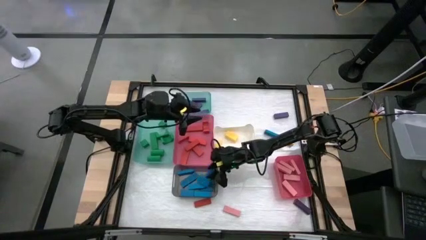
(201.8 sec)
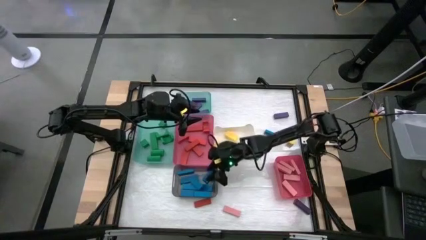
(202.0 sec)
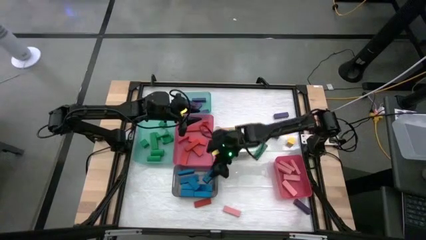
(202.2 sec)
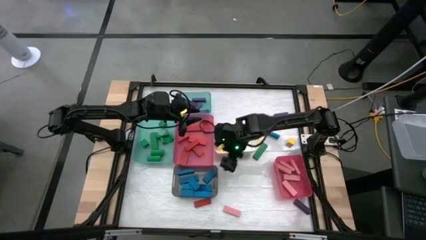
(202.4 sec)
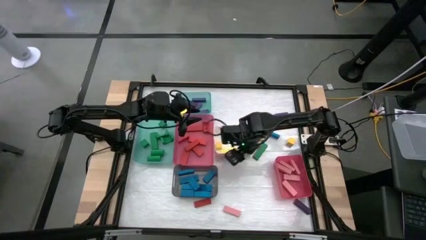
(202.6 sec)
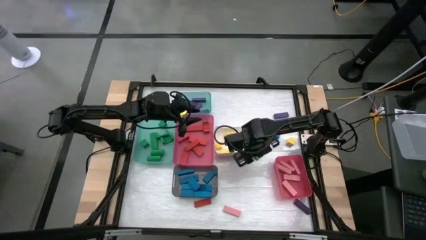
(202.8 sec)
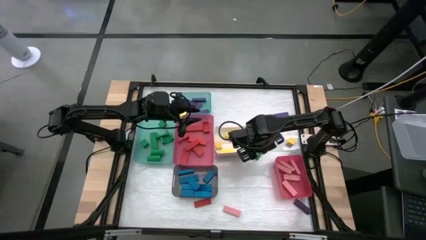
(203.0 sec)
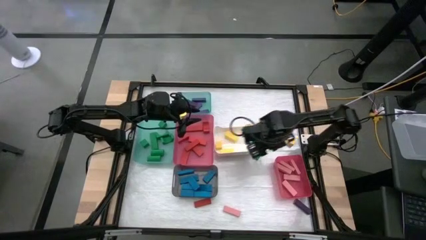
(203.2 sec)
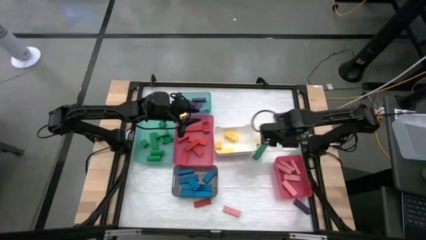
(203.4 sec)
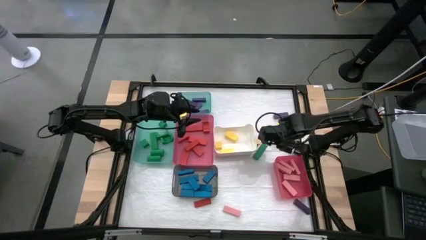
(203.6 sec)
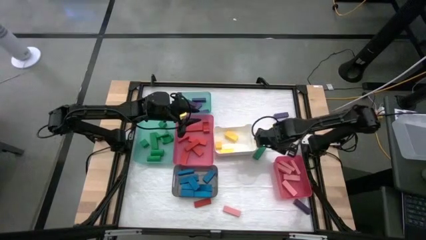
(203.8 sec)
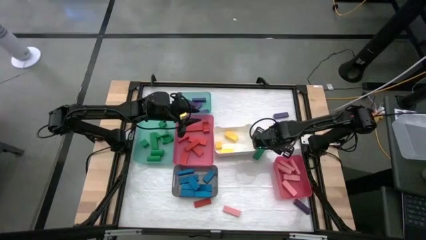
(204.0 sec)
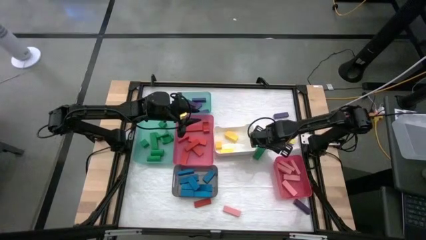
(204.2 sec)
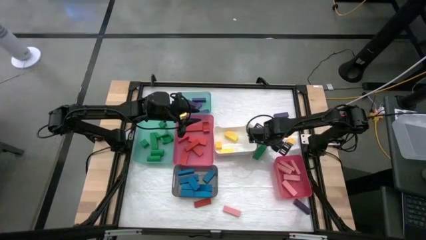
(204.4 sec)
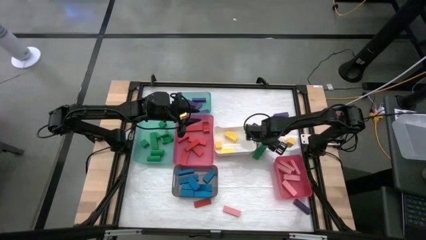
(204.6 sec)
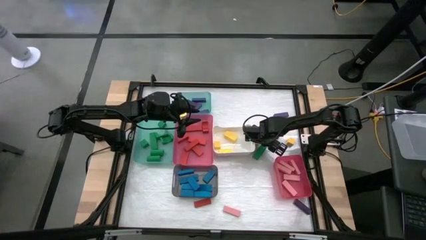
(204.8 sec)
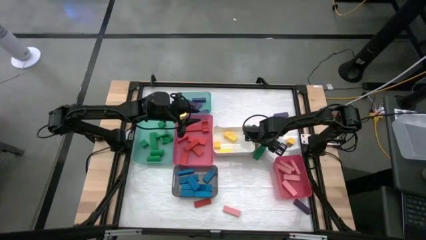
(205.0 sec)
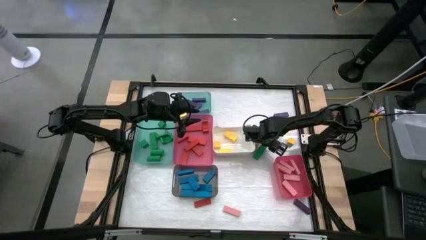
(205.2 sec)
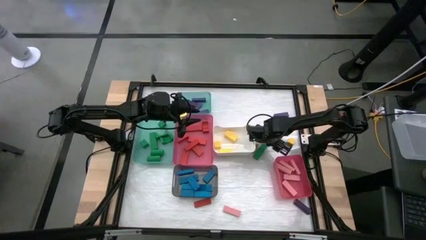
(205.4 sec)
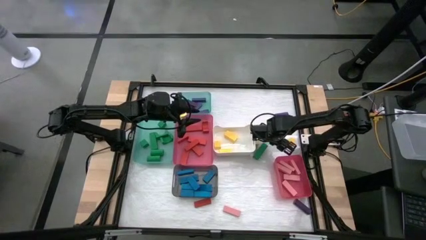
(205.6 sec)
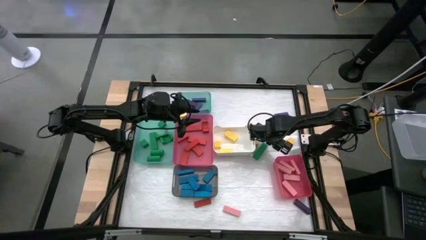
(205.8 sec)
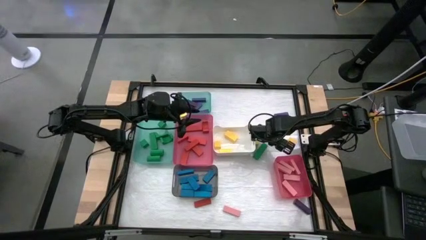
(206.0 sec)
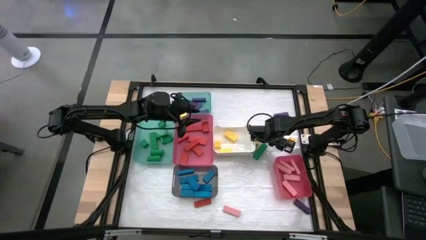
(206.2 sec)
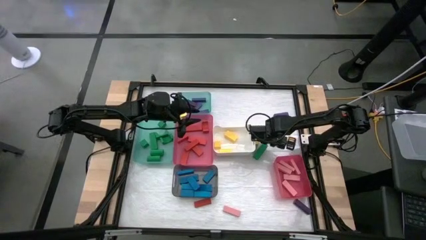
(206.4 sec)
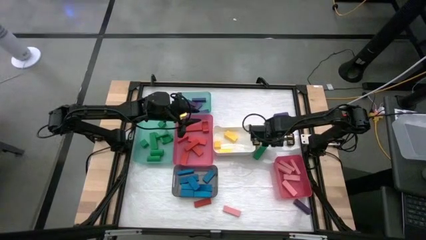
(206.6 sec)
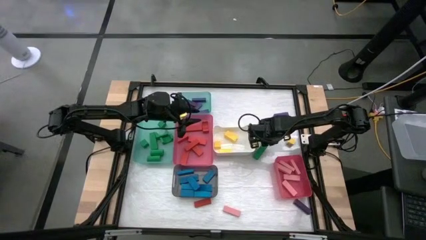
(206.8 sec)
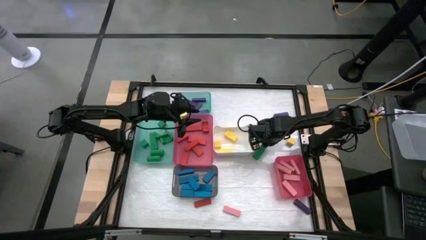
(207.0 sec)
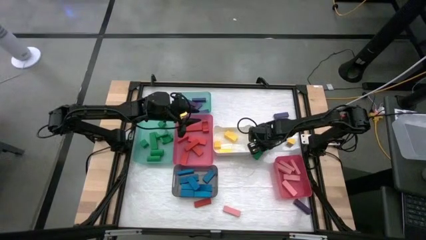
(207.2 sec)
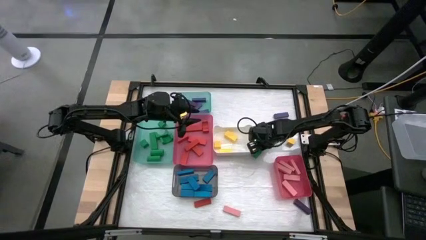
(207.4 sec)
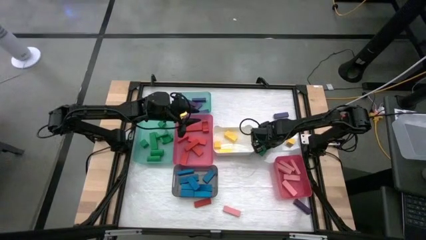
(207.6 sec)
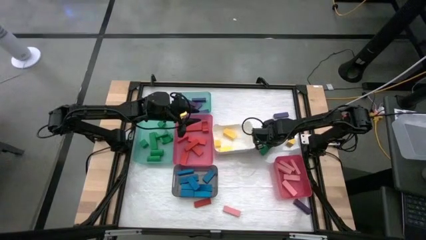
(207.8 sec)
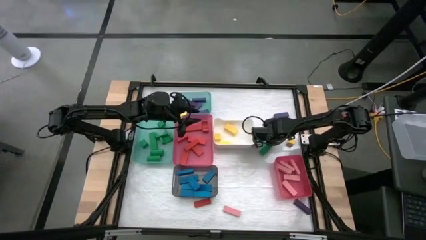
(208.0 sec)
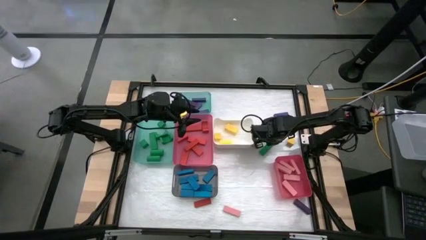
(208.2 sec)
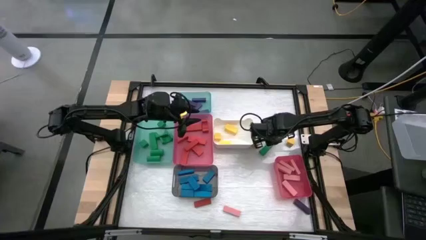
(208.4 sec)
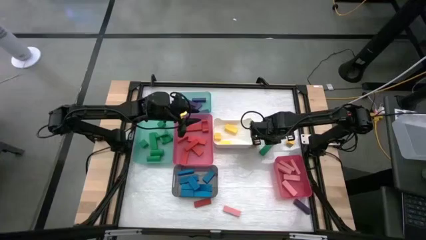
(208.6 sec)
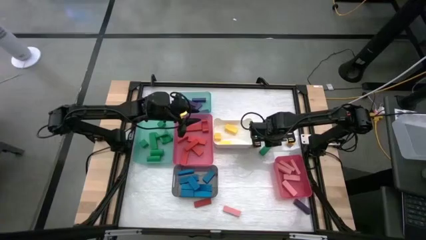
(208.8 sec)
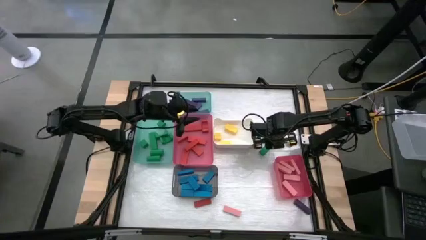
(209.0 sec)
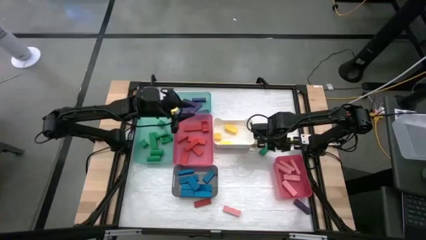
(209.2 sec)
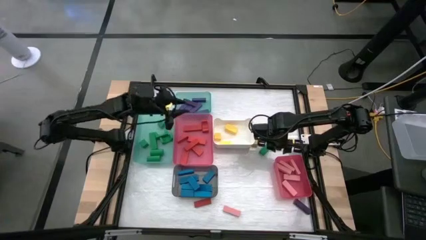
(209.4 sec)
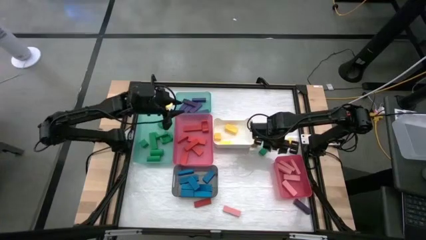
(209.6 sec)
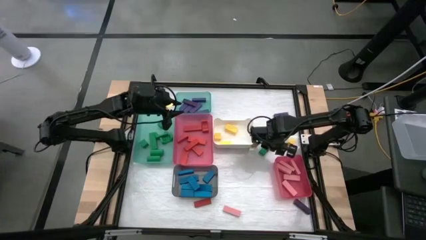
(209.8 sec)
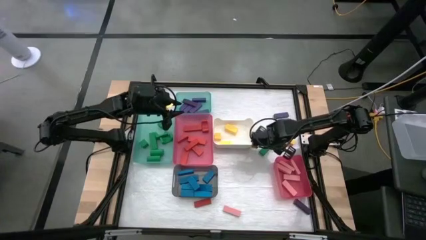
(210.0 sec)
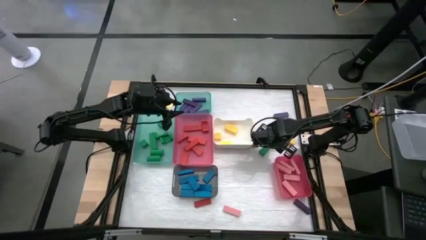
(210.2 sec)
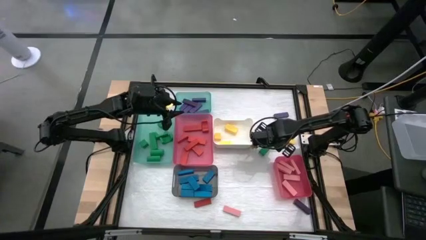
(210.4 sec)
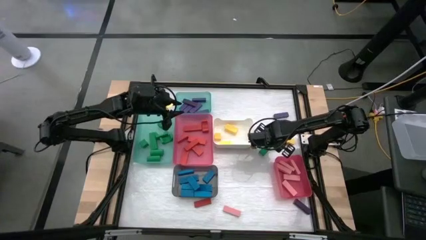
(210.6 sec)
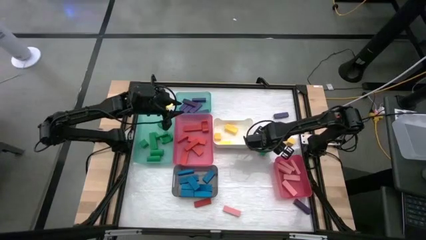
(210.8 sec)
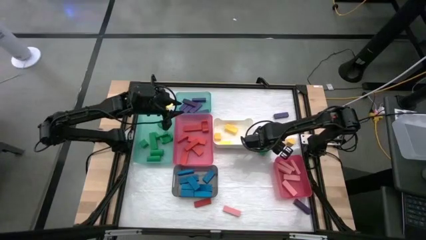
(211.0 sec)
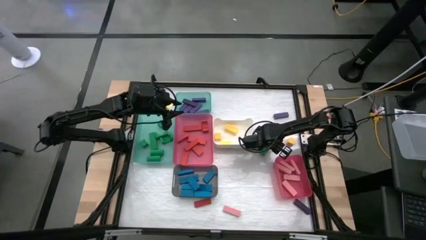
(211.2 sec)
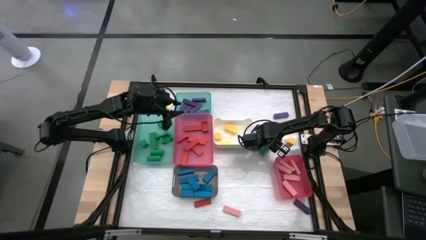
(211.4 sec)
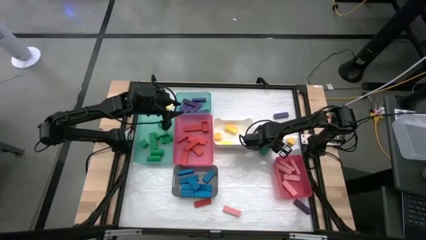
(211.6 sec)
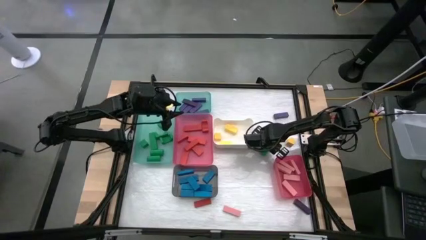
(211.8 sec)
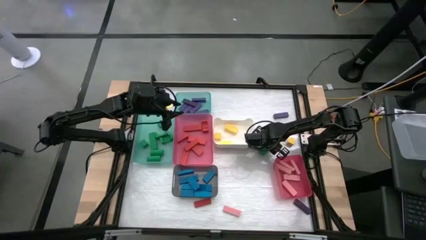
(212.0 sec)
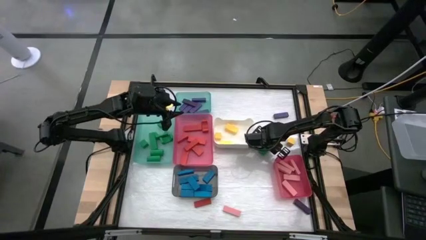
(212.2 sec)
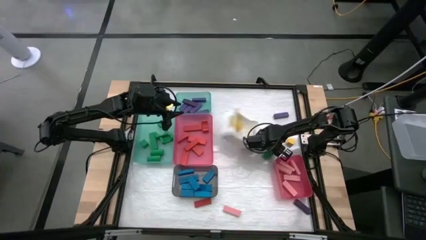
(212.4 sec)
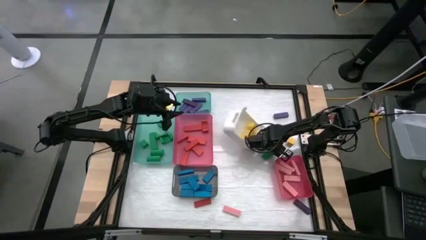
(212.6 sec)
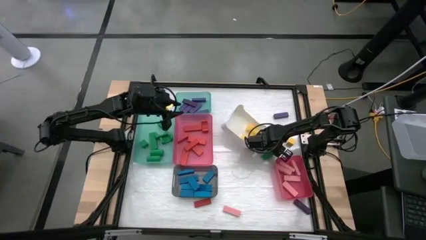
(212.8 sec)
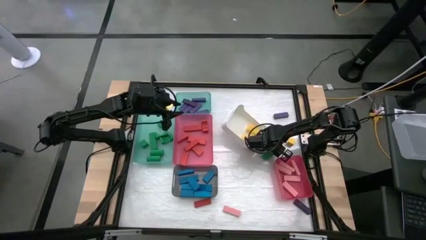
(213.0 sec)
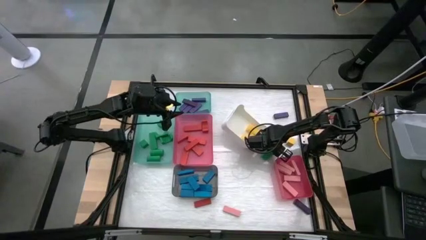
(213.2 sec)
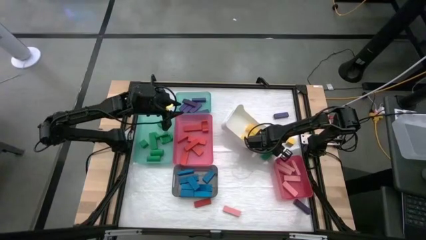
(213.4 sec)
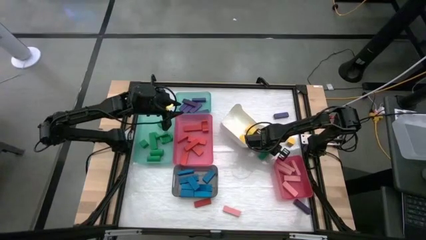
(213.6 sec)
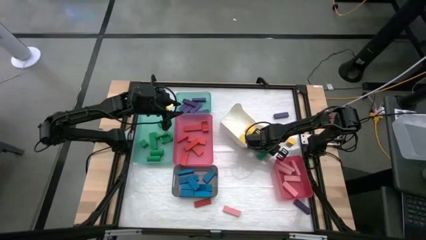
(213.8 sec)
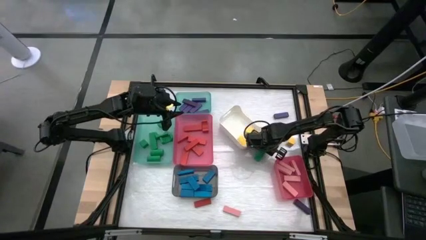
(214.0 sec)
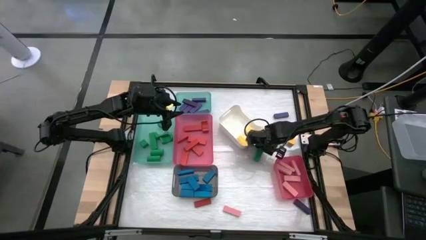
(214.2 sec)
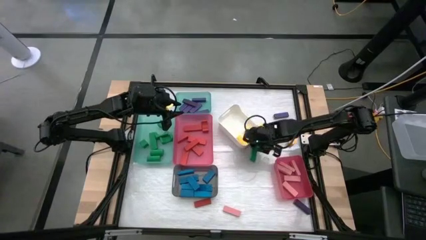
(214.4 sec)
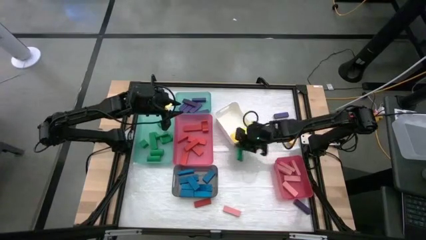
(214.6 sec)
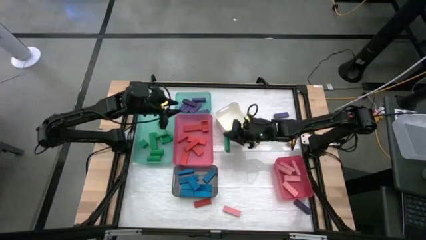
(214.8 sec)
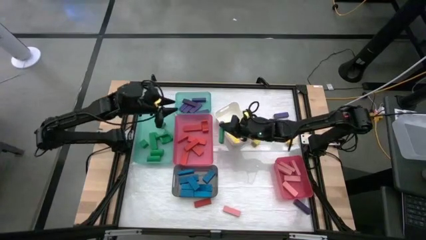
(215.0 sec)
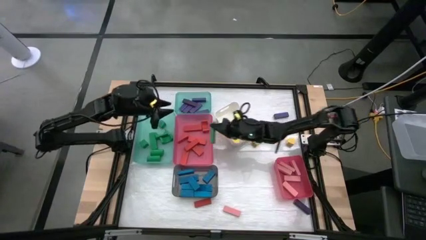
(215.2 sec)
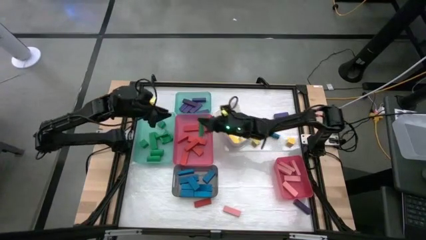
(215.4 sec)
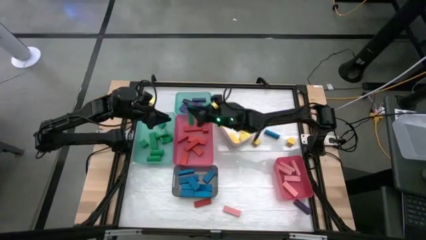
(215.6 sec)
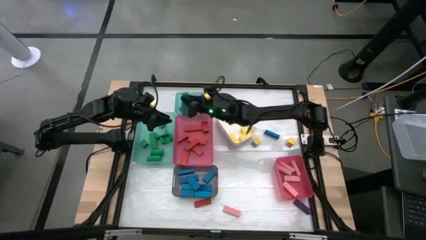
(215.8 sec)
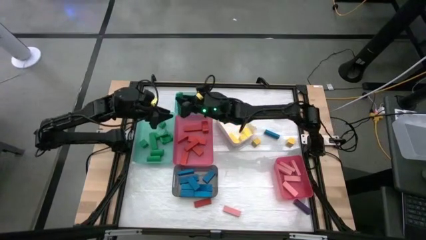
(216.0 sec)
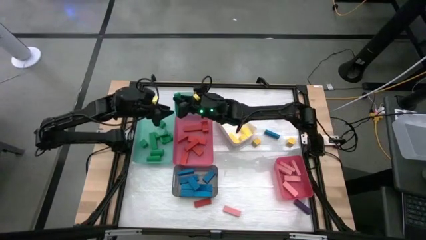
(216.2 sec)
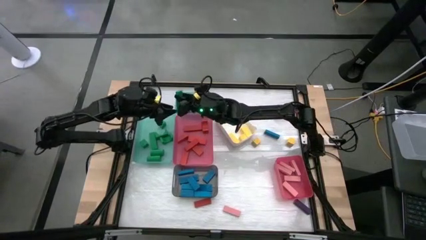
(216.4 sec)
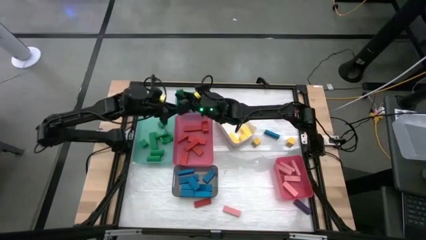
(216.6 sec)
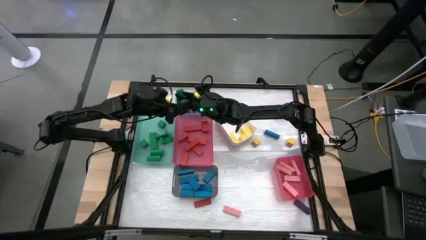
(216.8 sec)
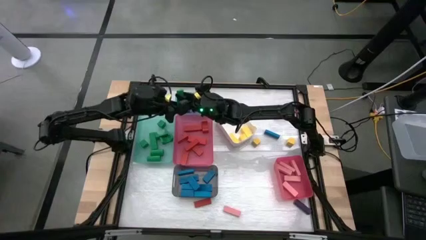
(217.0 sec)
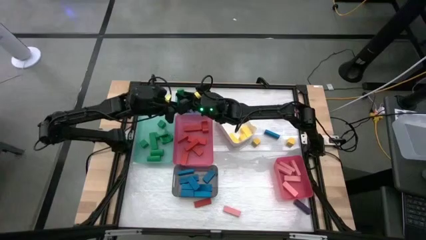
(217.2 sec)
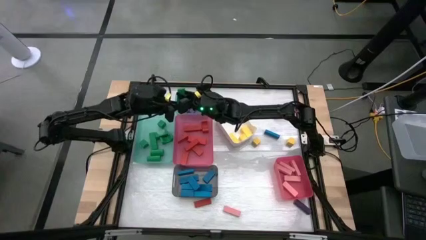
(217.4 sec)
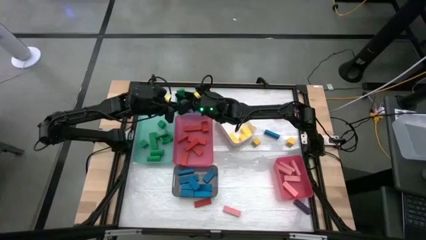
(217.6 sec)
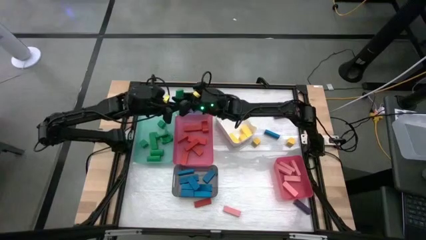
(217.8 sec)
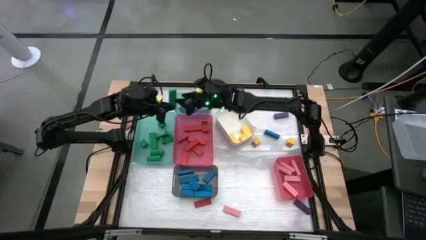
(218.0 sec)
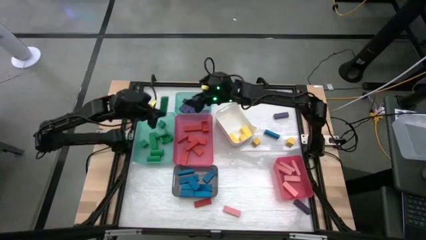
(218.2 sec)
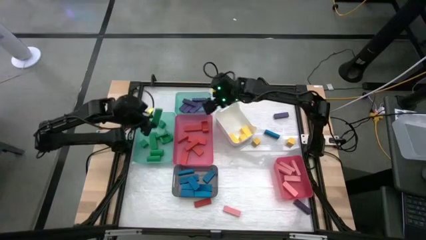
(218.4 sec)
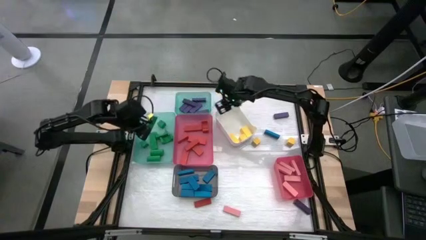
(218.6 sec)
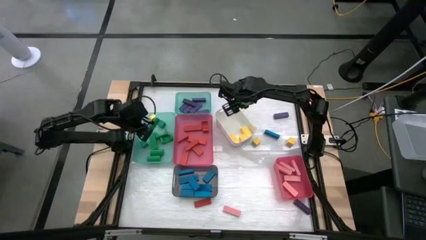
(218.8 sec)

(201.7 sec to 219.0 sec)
Task: Sort blocks
Put the green block into the bottom green bin
